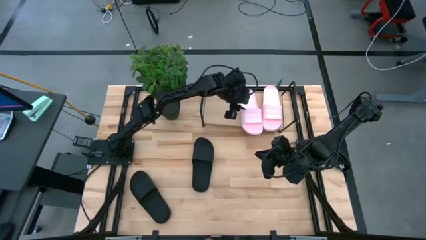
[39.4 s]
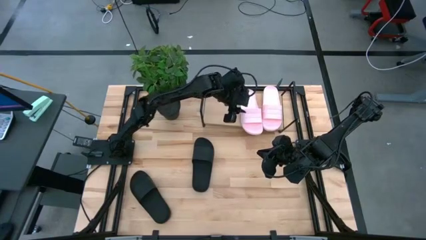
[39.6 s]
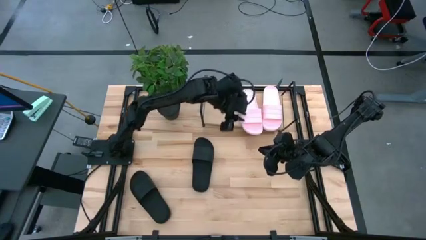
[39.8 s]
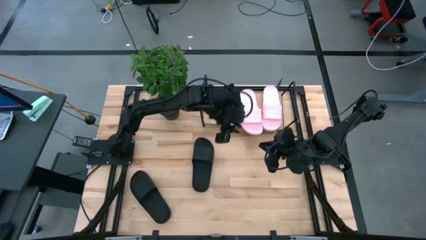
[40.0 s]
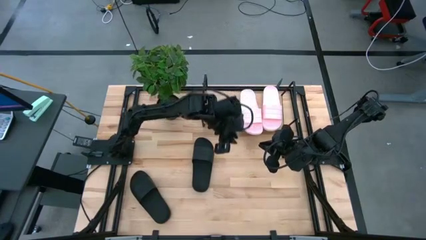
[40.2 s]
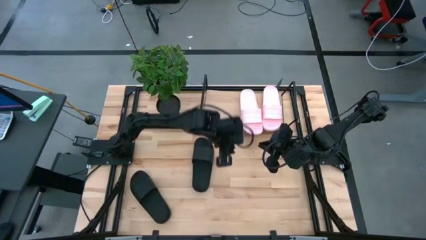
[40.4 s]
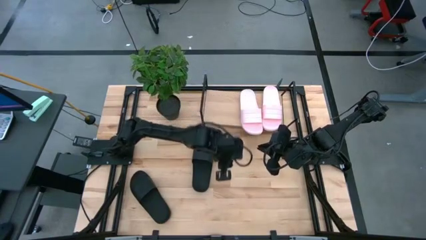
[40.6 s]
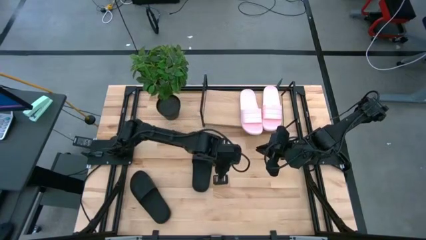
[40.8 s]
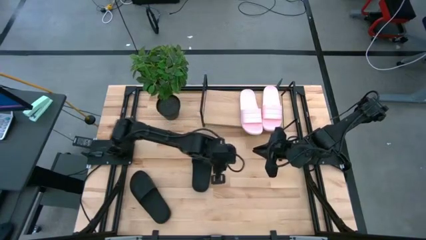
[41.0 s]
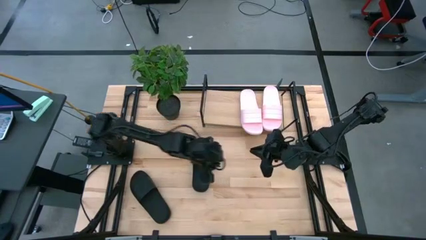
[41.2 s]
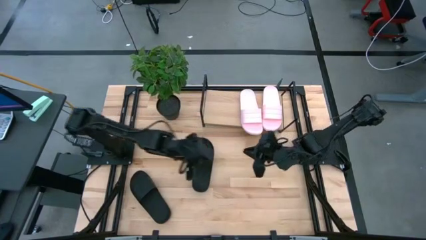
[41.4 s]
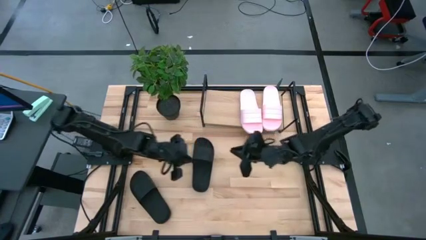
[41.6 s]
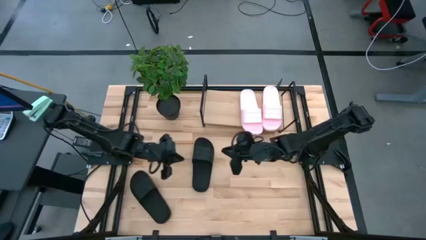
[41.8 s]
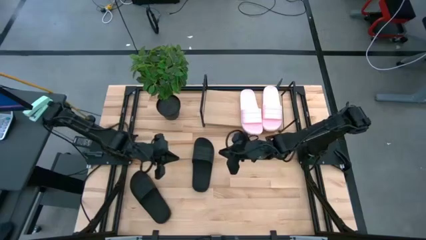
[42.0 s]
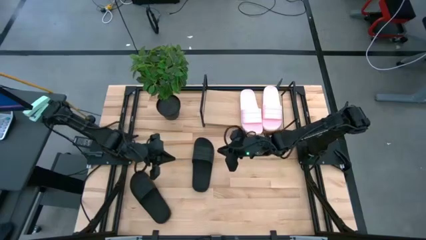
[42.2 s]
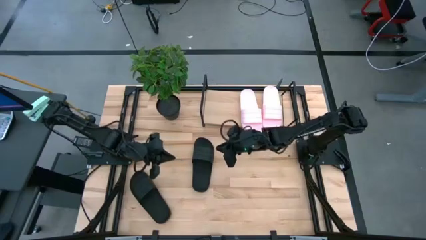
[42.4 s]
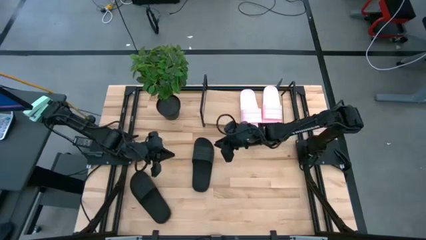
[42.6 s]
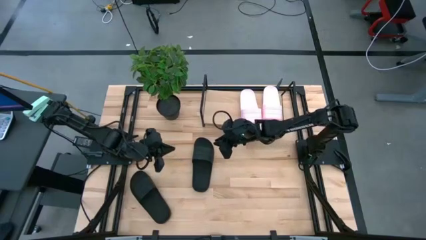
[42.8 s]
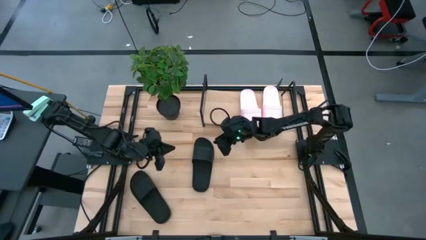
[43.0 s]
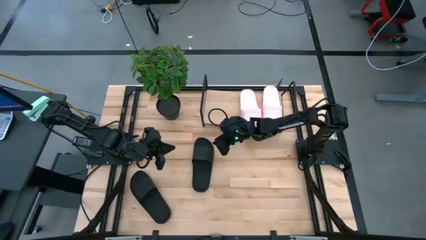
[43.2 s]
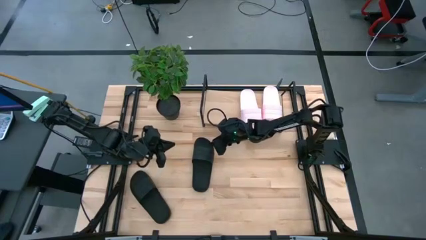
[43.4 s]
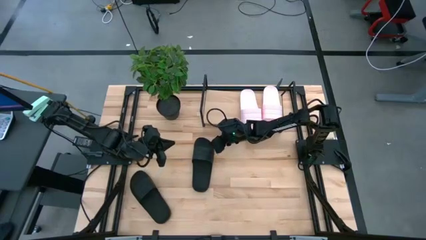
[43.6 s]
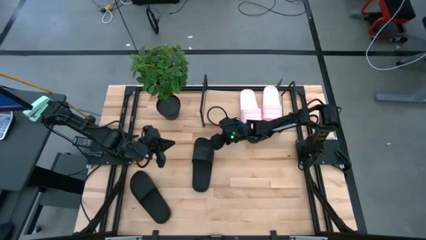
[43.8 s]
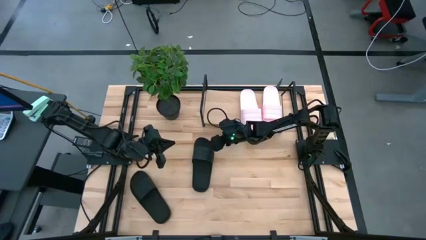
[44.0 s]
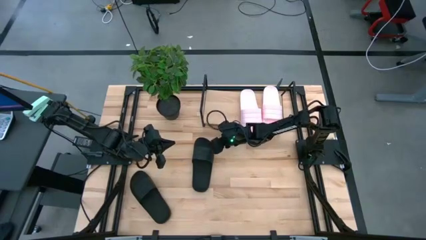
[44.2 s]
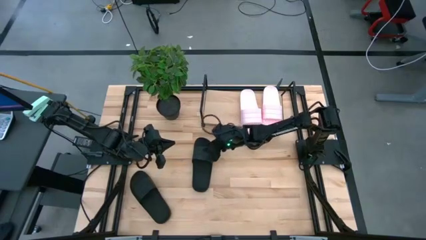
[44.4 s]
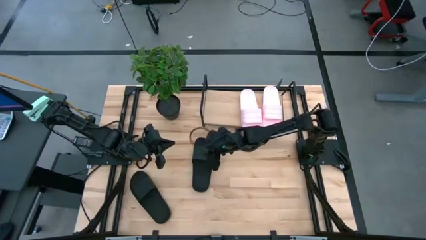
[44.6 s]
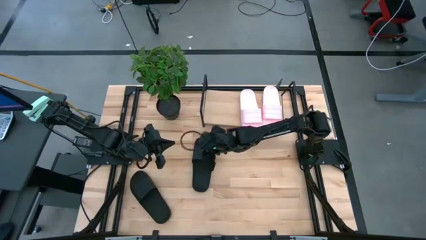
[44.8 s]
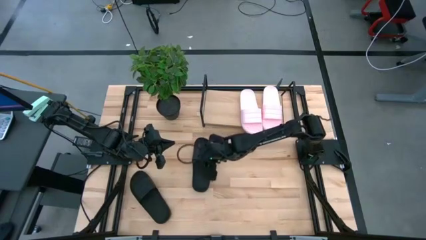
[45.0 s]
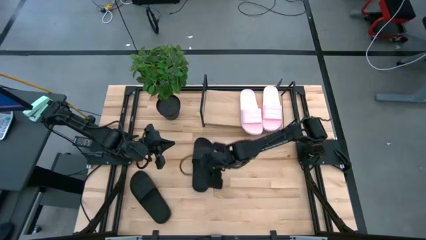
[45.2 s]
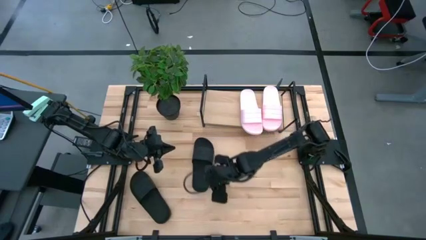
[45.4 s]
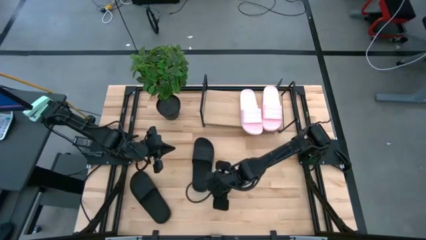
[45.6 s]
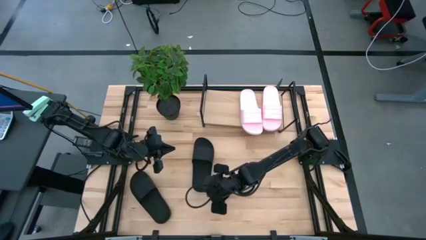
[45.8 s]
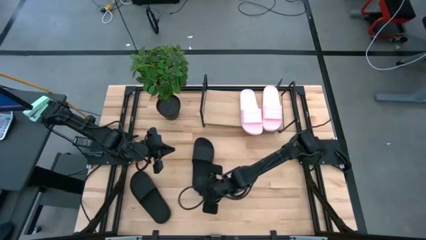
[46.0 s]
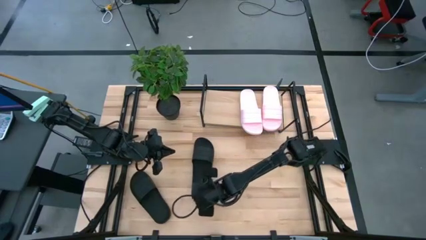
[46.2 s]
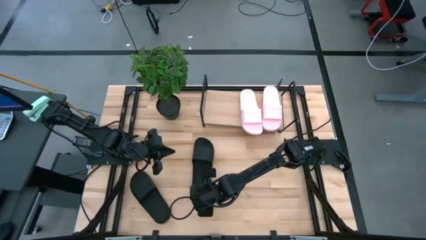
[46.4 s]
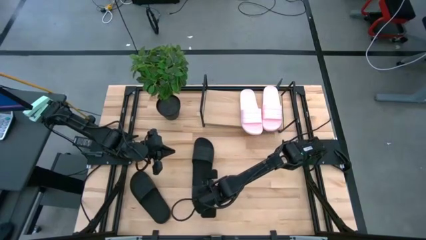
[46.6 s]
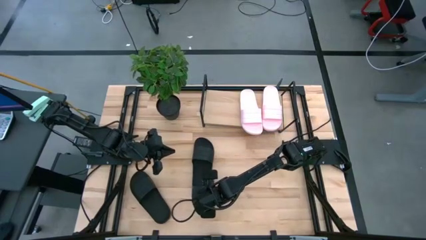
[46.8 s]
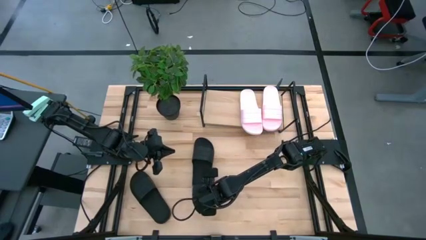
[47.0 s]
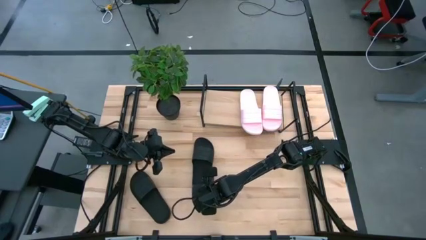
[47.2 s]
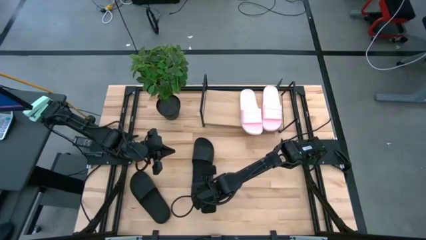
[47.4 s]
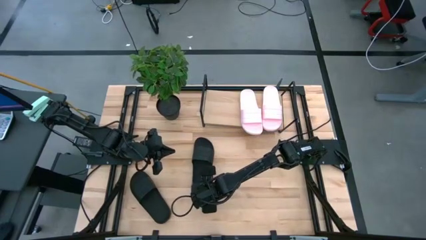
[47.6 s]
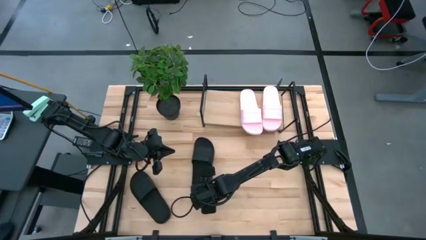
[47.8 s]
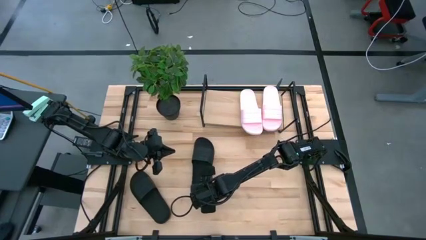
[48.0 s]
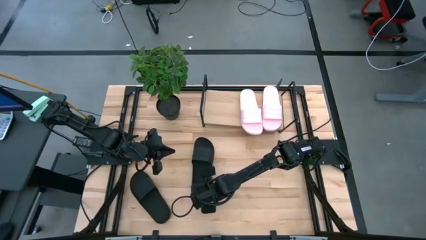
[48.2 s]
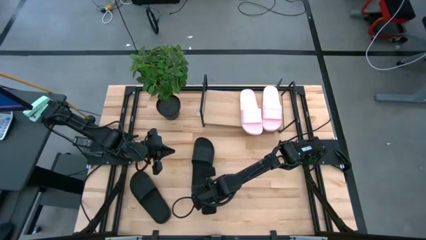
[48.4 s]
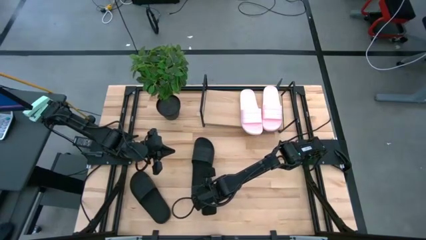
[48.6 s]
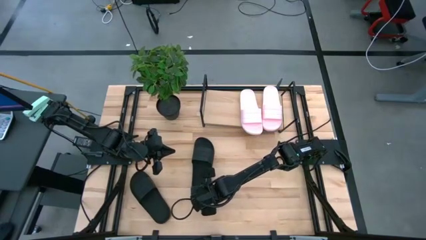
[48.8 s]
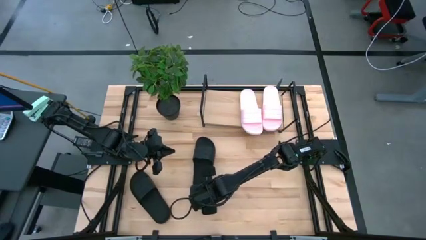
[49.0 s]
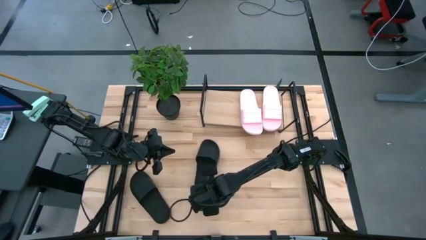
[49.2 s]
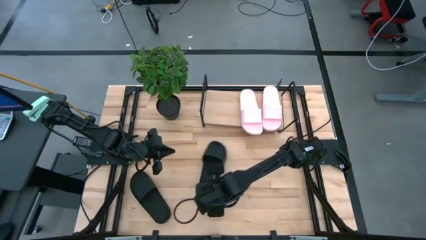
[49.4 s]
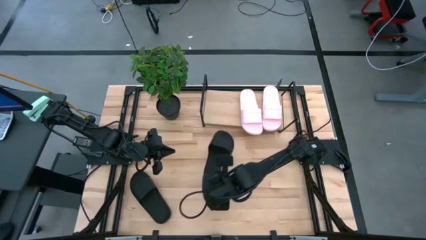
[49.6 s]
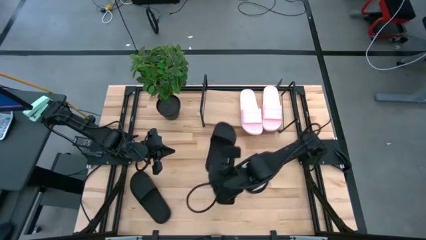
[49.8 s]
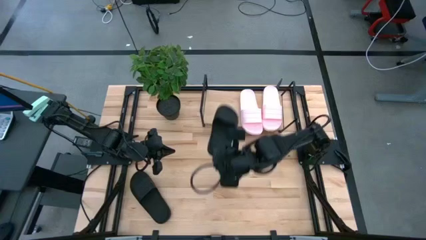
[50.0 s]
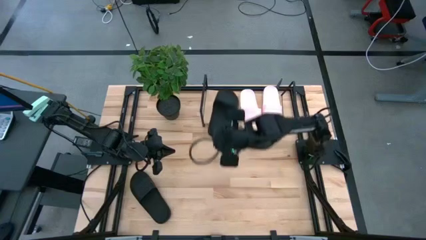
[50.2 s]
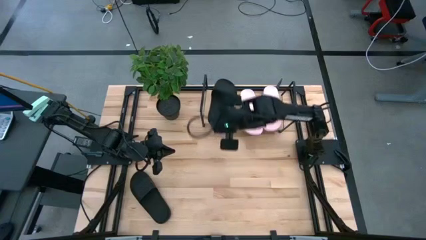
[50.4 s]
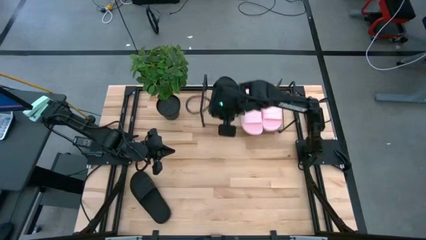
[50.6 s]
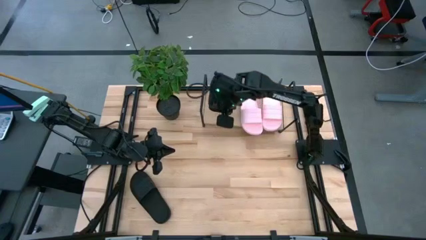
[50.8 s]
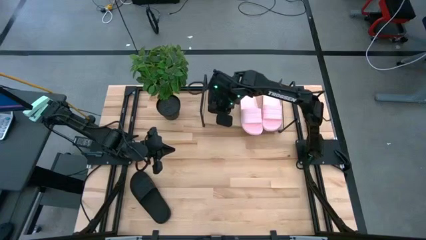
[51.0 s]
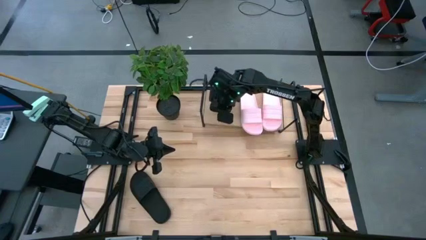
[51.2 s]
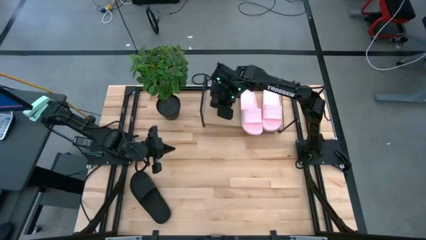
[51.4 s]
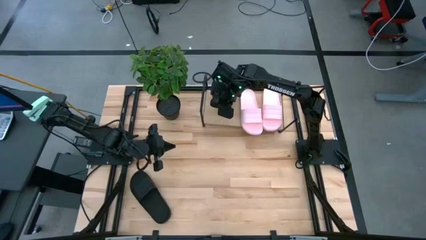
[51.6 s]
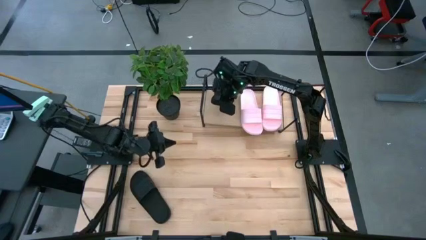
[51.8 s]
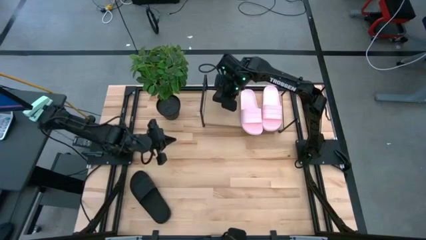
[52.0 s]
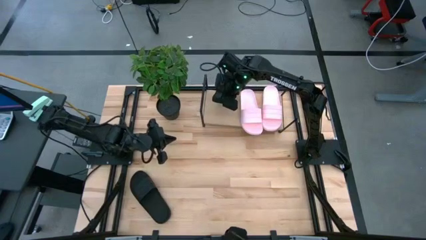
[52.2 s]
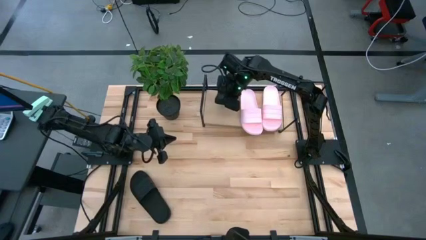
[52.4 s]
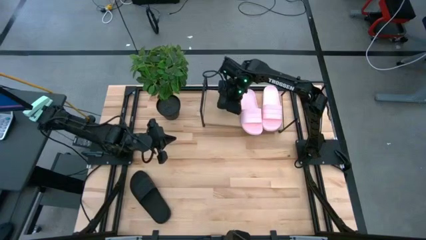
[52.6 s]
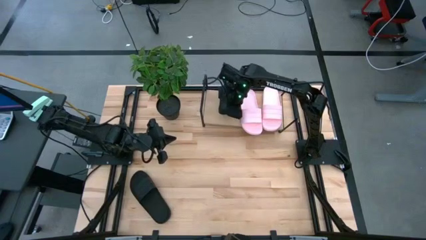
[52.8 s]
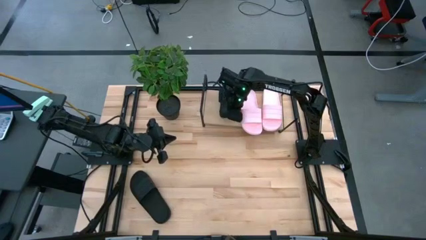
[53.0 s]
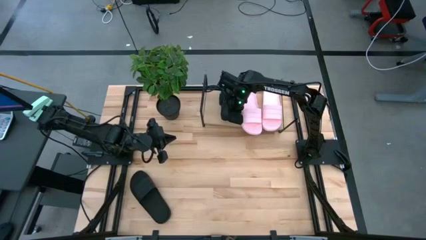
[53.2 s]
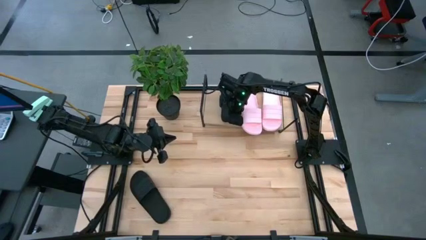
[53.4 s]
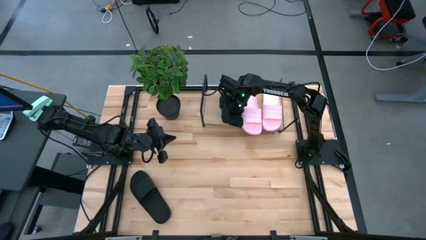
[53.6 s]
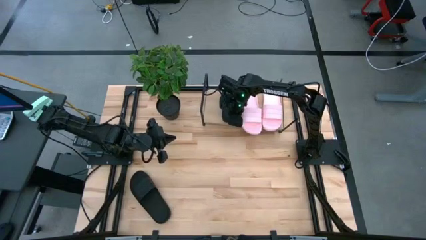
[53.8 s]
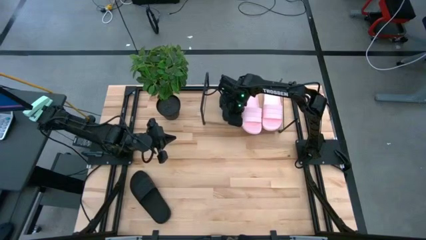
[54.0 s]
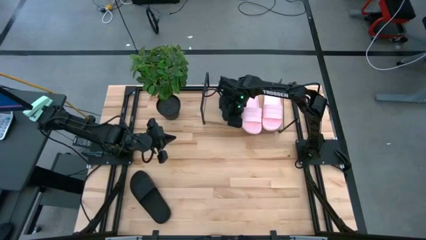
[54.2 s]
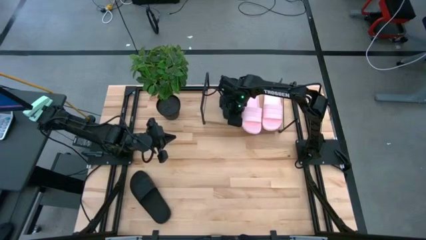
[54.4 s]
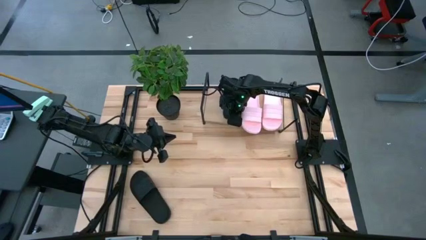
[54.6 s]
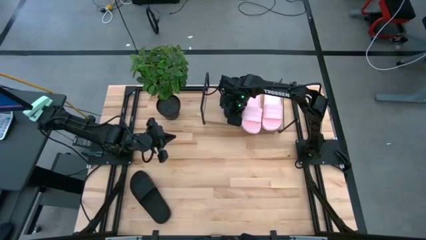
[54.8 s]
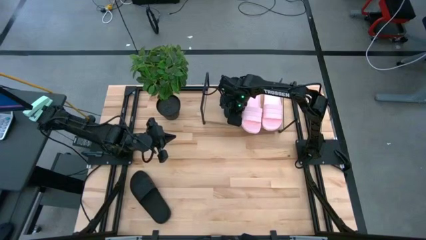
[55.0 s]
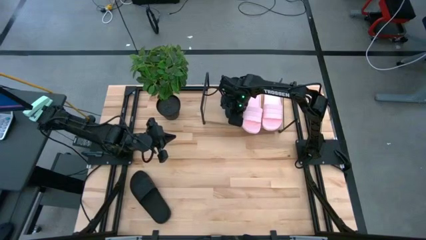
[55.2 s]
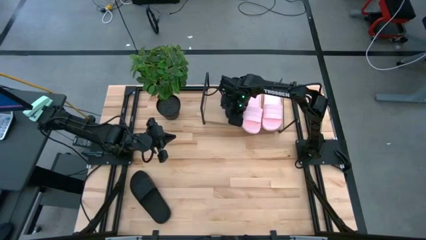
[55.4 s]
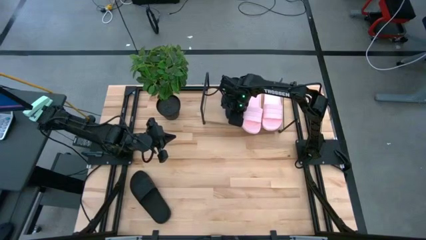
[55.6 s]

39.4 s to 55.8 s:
Task: Pick and place slides into the shelf
Put the right black slide on the shelf

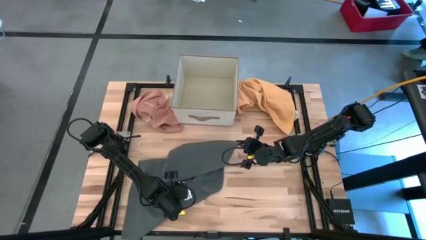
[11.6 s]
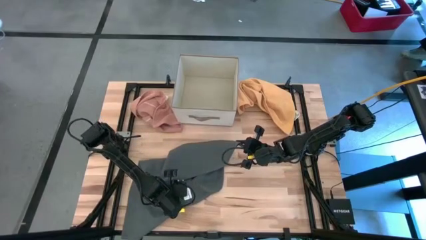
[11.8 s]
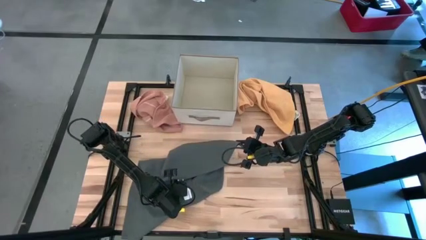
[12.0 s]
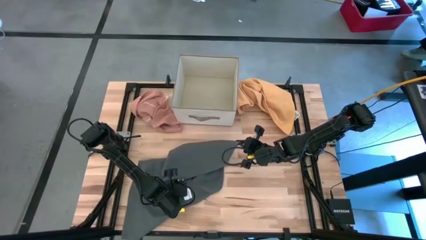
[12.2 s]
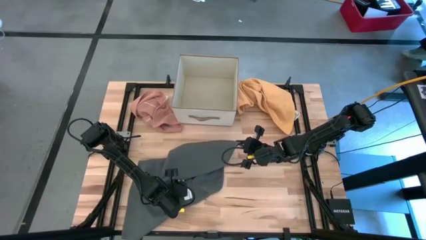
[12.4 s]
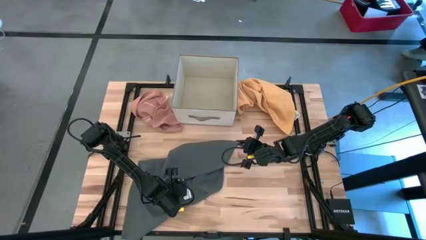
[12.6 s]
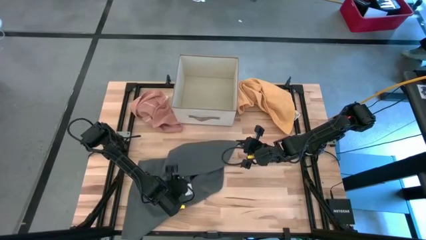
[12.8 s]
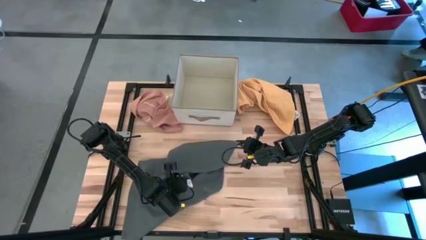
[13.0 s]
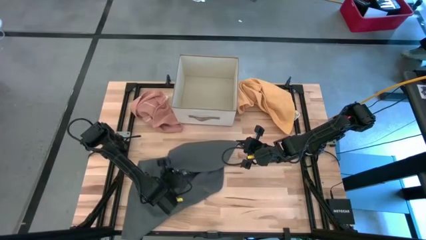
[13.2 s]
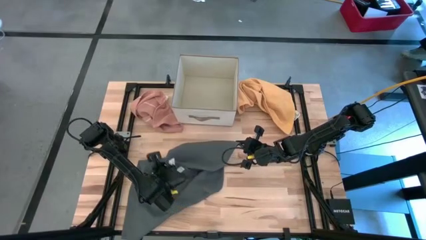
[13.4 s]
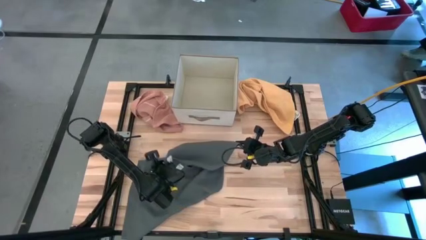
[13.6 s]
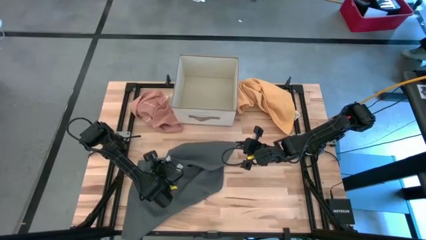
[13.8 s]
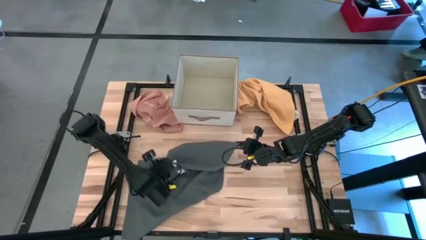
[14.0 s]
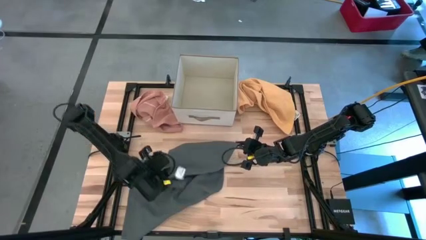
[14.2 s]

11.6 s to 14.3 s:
Task: Fold towel
Fold the dark gray towel
